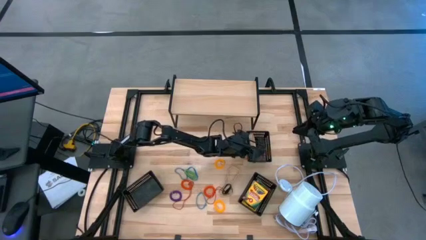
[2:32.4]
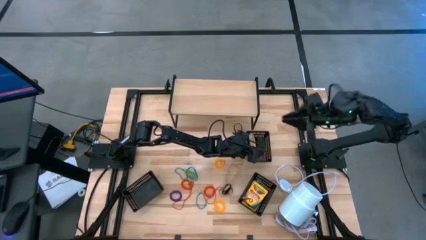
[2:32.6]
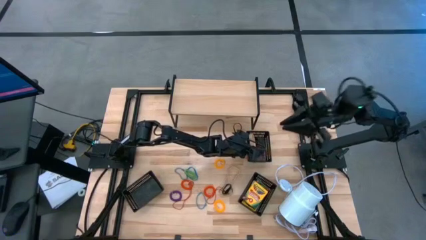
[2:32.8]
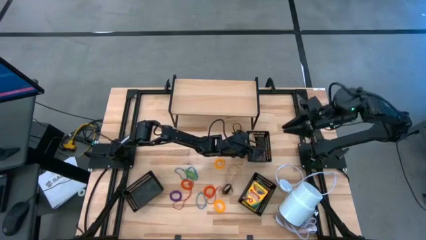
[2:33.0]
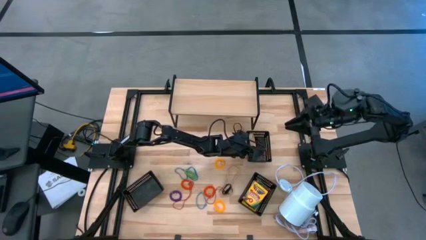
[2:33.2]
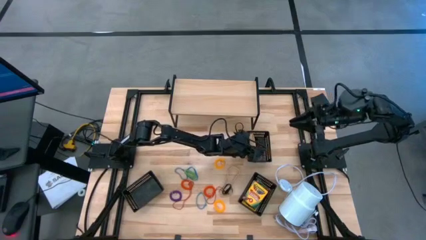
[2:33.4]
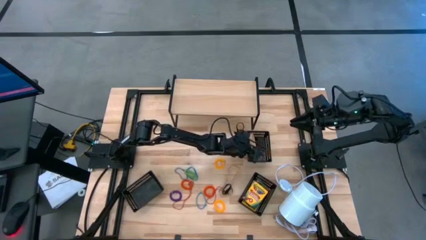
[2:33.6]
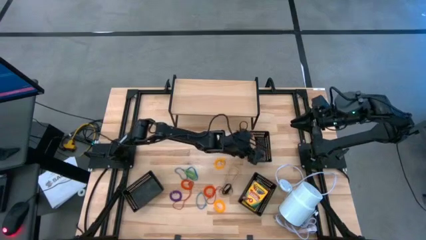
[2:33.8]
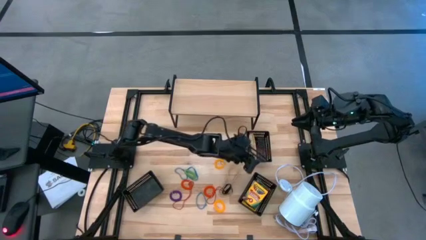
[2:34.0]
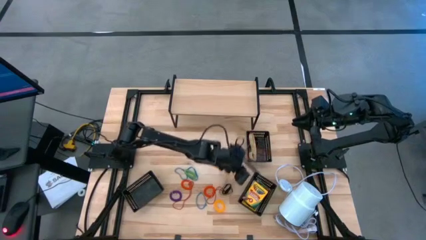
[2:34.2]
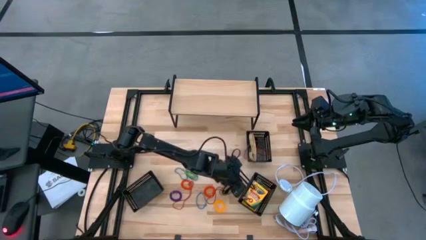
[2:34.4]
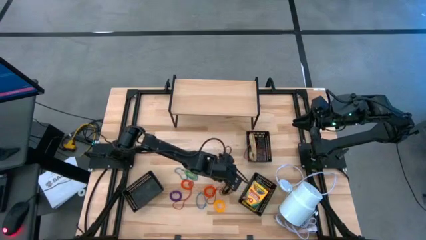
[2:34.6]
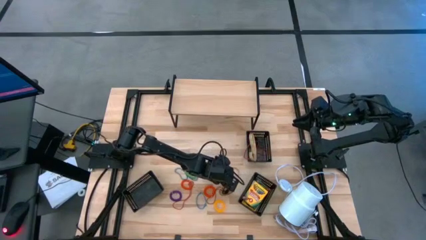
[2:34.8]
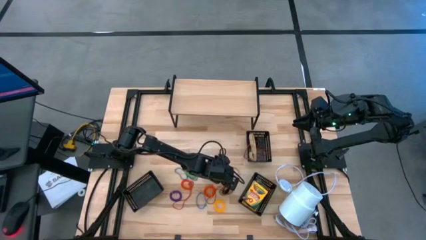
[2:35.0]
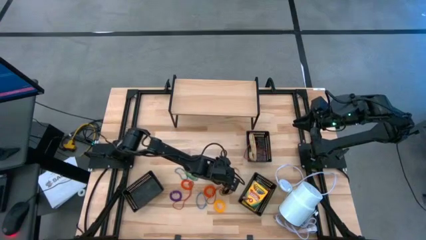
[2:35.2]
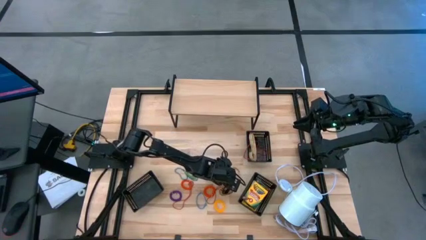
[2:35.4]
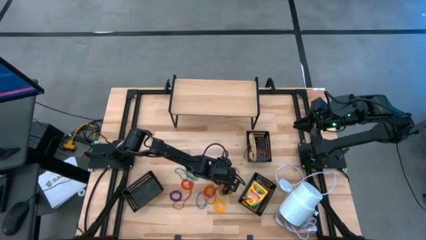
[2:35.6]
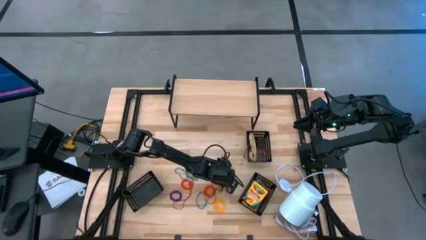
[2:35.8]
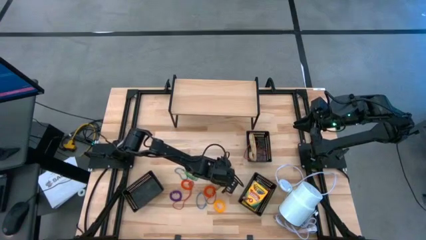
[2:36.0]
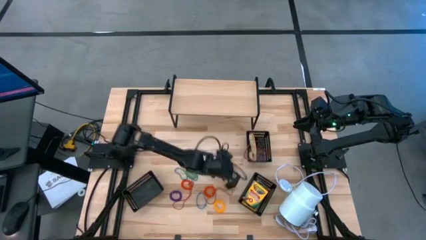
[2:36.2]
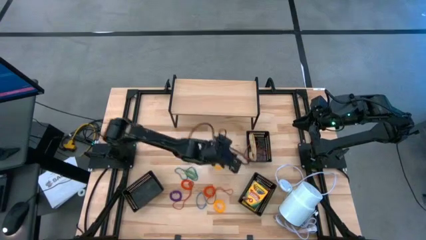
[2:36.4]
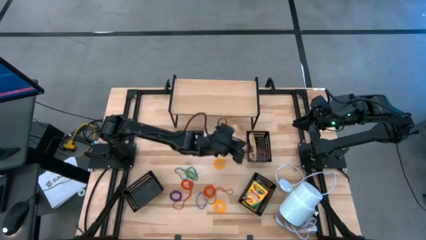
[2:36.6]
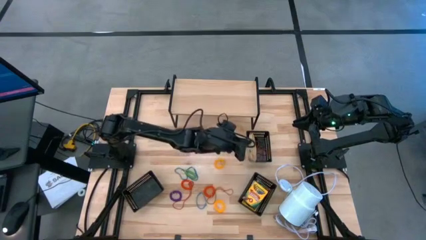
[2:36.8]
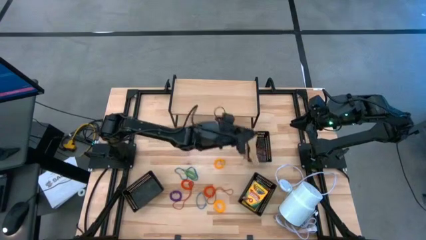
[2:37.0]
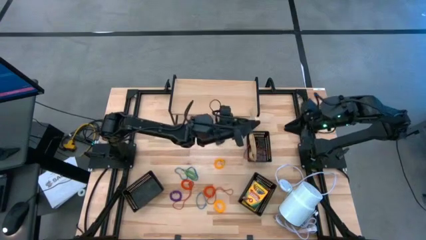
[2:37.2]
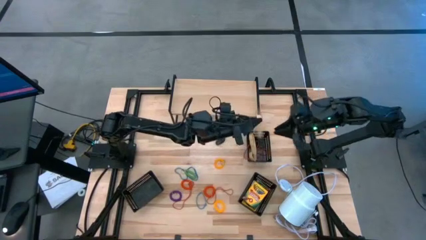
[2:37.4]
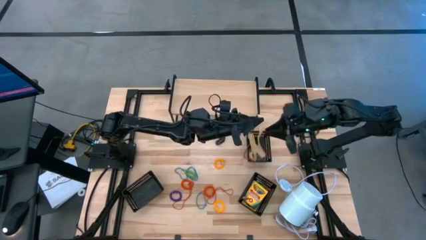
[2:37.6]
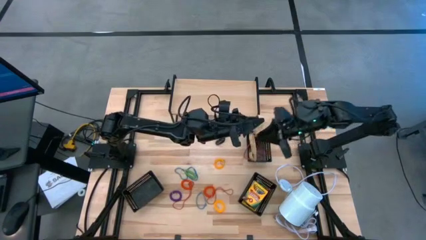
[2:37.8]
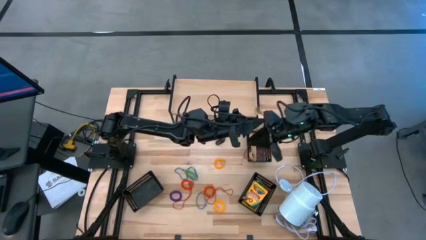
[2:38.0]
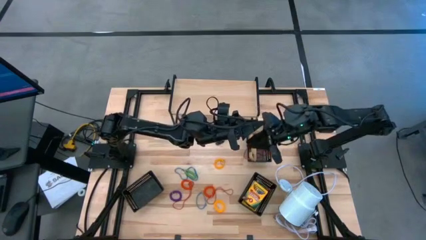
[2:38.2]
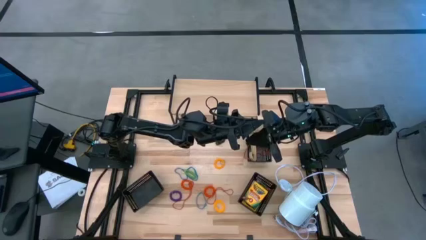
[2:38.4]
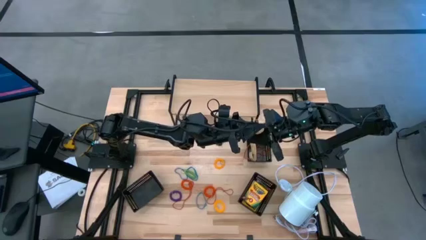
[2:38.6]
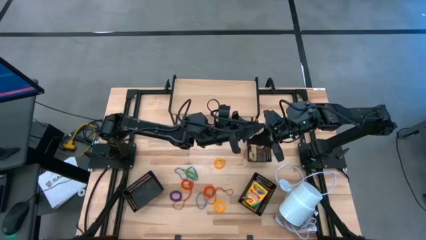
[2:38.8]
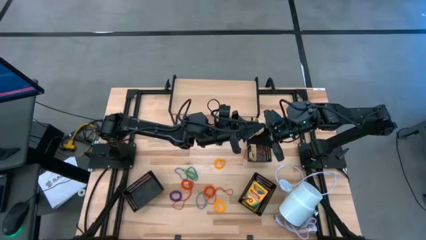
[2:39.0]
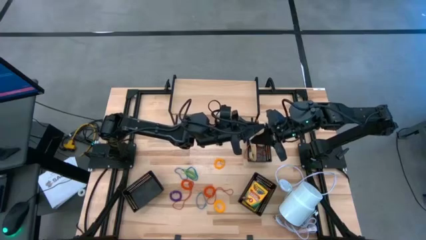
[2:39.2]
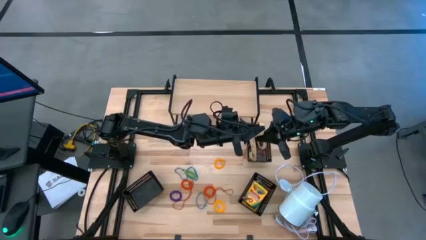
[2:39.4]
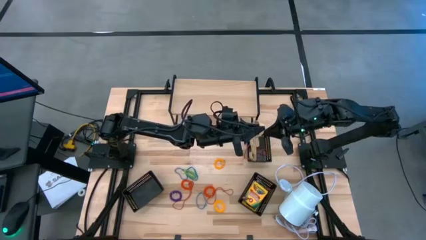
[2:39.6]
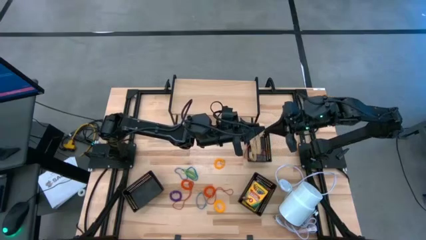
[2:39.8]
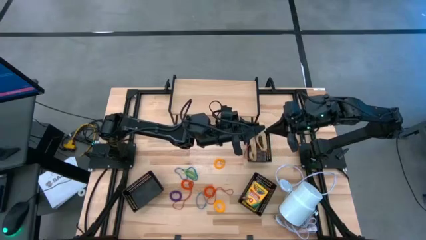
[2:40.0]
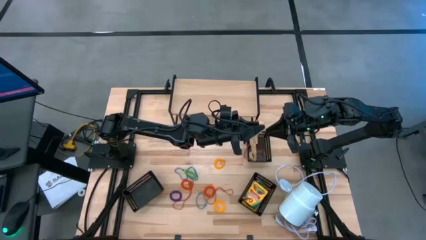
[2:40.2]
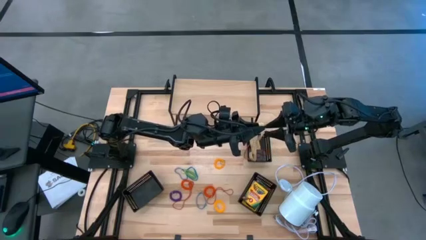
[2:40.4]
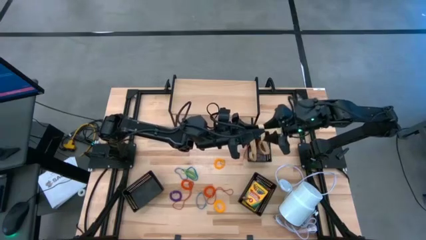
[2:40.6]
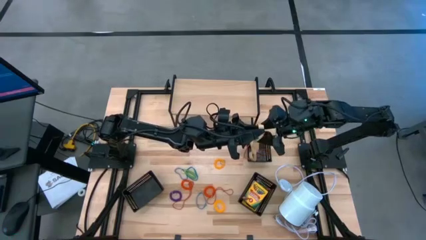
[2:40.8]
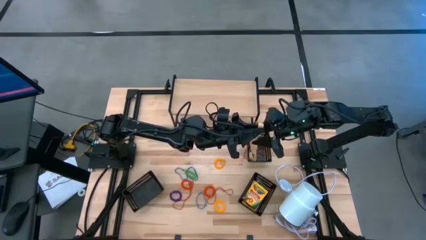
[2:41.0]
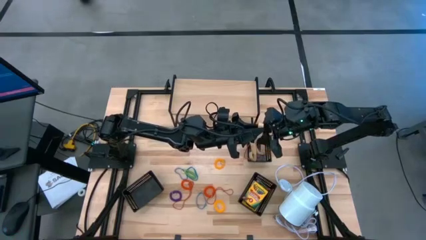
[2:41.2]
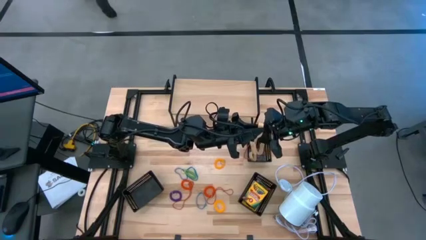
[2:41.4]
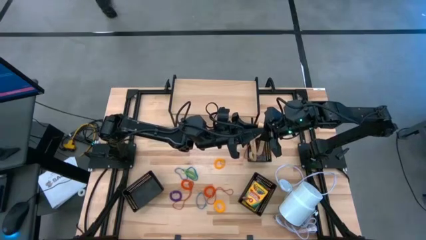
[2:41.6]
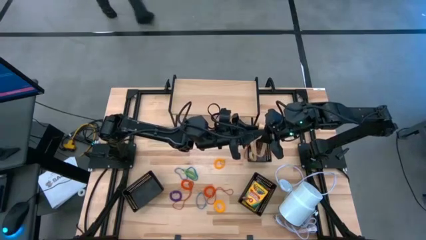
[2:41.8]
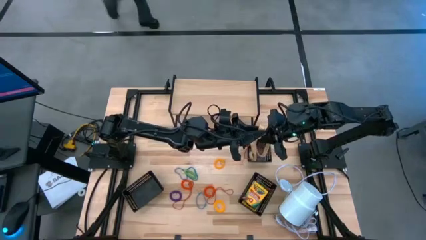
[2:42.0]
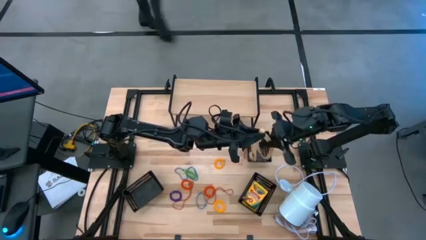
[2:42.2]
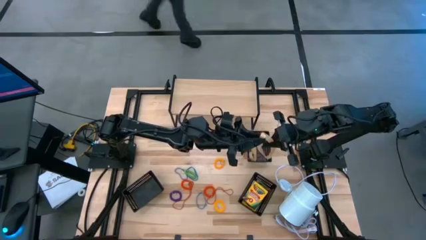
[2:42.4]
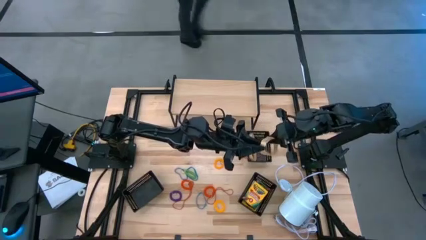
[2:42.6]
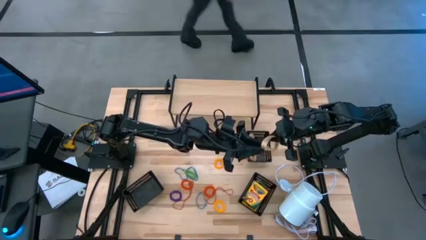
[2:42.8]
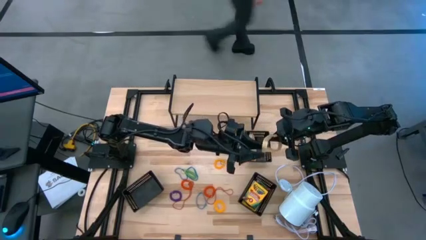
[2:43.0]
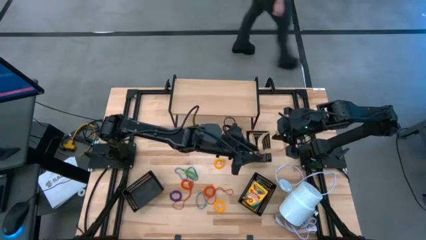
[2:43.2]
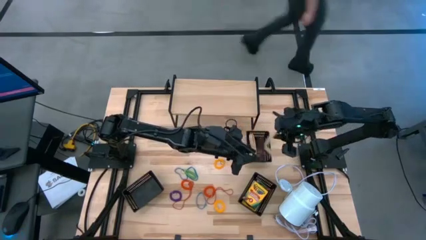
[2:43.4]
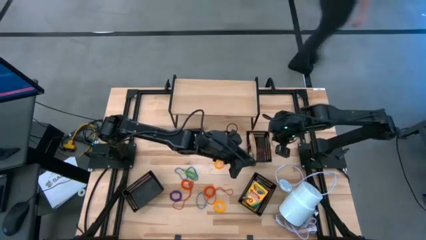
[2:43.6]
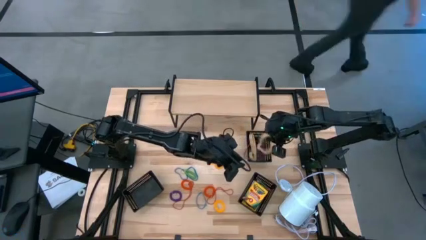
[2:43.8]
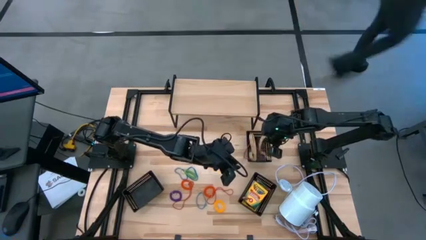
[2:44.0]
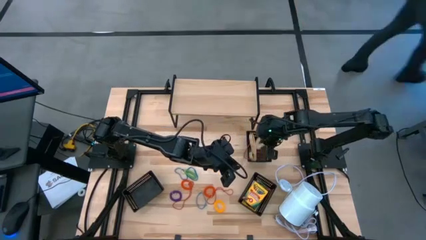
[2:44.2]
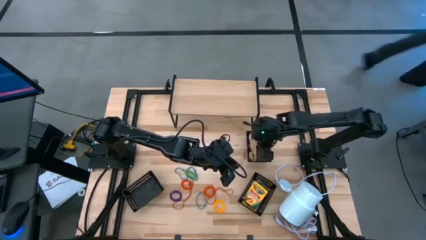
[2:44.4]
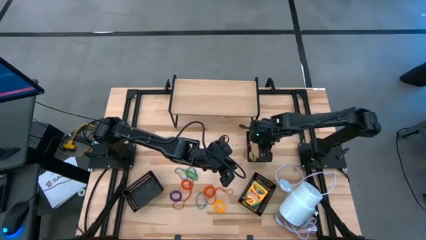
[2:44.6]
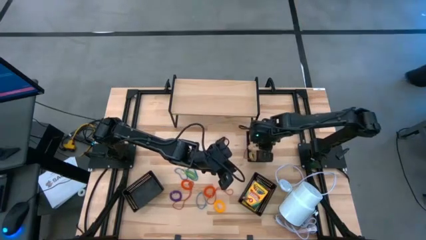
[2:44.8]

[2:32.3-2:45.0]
Task: Pick & Place Office Desk Supplies
Put the white rubber band into the top left black bin

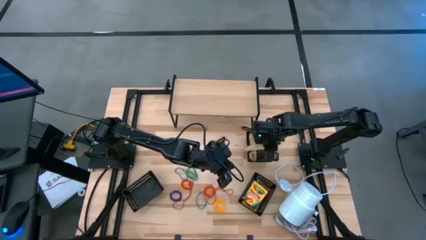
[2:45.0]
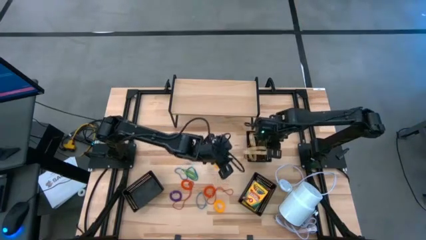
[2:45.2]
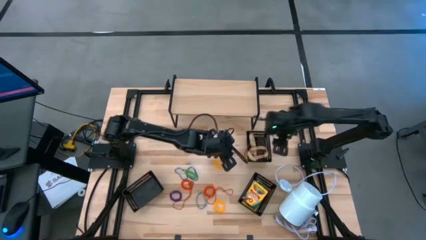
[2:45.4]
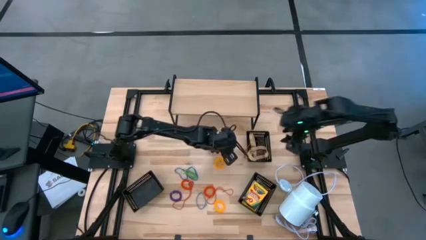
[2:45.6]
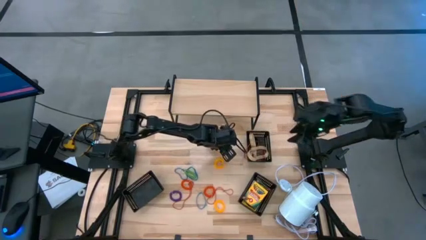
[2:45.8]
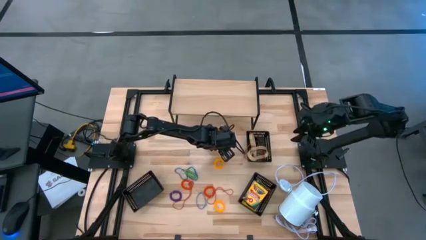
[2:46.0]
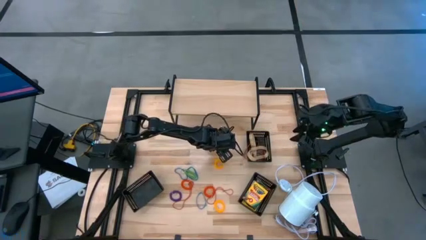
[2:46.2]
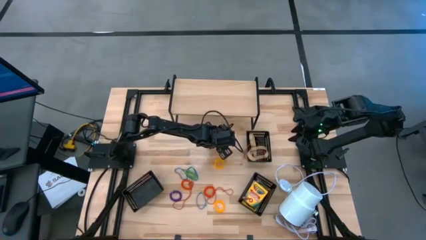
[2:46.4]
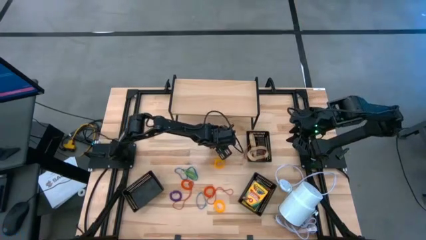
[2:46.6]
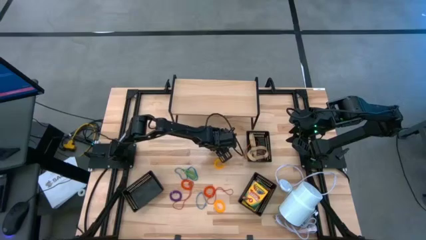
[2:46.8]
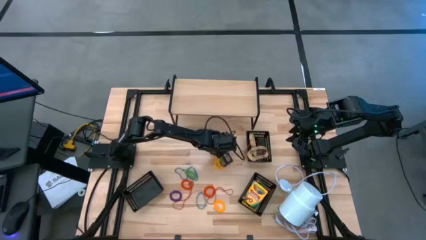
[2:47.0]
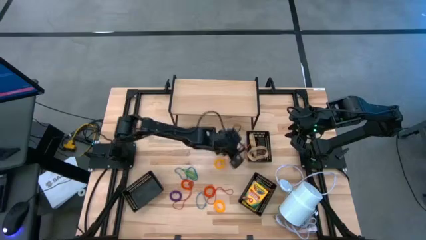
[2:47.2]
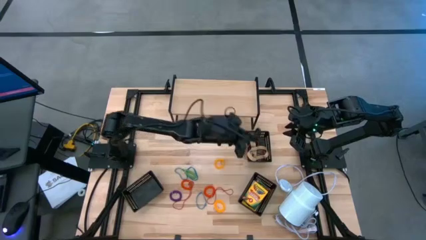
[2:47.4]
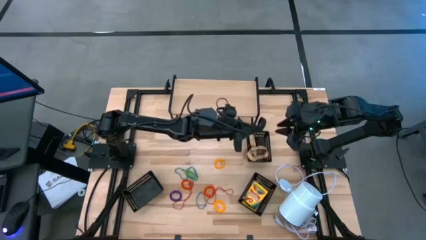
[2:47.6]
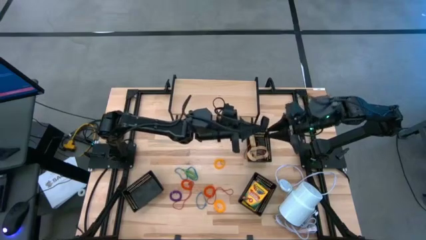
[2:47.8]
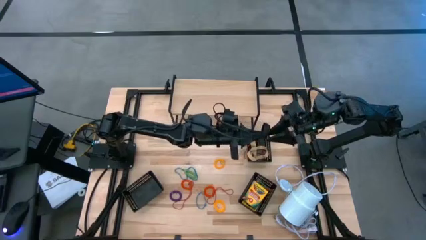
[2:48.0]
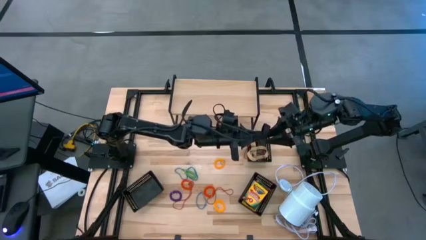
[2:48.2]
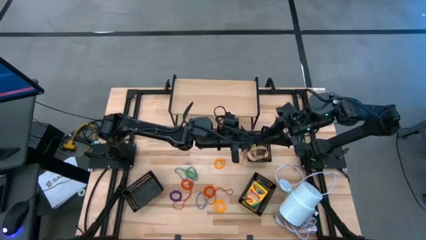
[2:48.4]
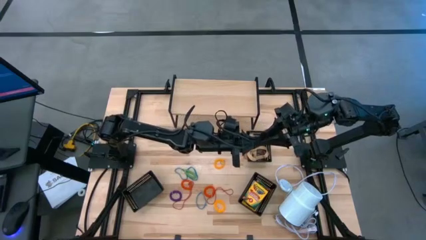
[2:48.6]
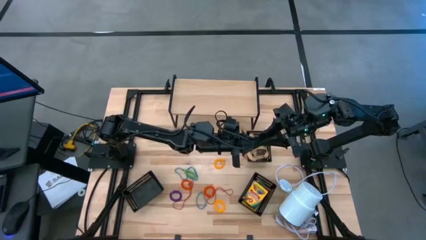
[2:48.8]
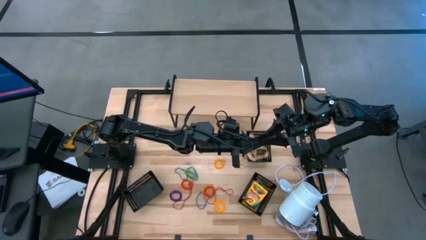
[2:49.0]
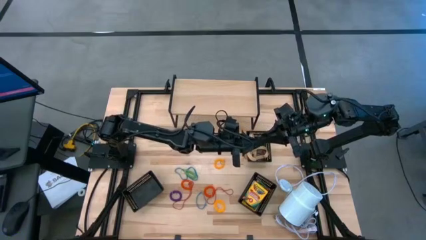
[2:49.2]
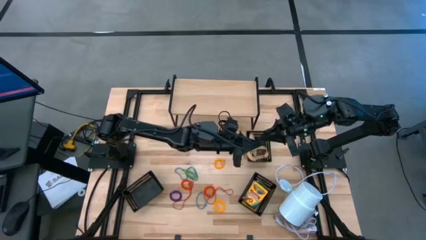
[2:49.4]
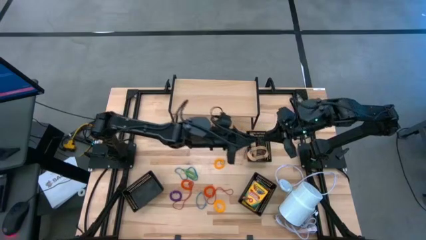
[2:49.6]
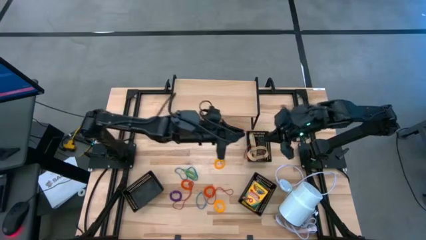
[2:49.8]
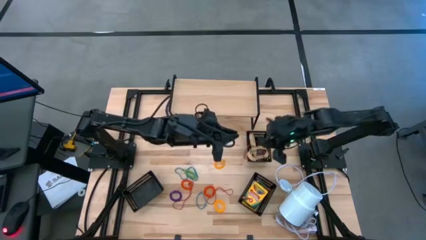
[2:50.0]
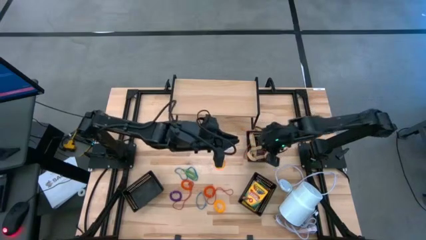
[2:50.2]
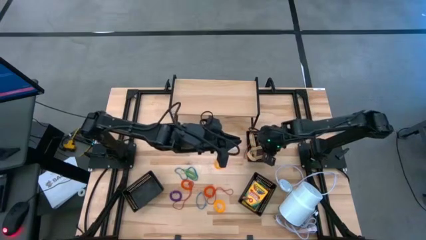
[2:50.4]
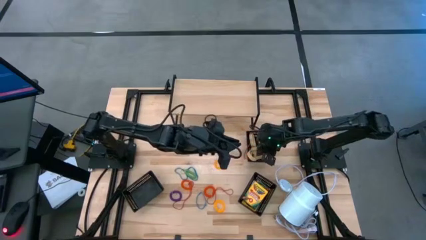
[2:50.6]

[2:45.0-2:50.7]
Put the black rubber band into the top right black bin
